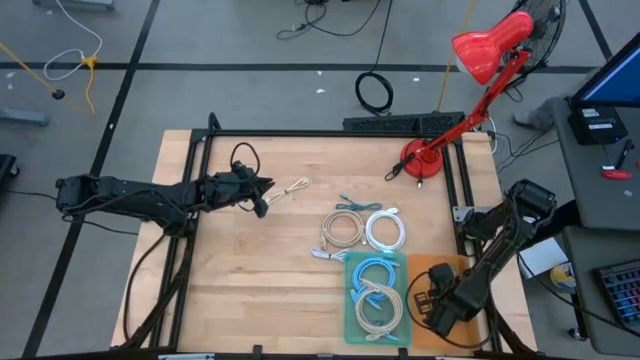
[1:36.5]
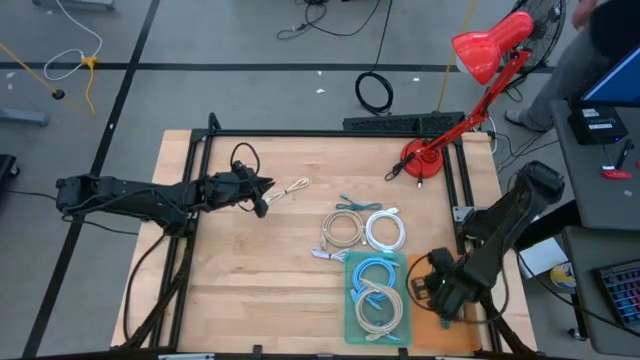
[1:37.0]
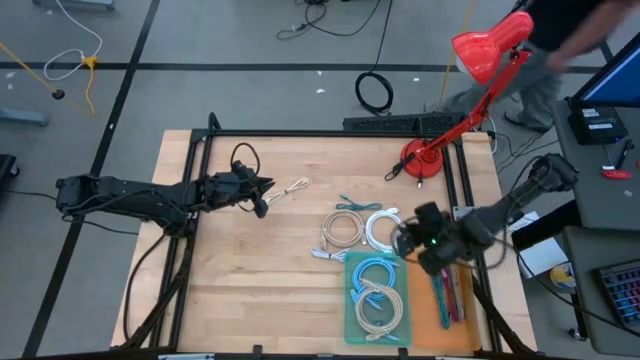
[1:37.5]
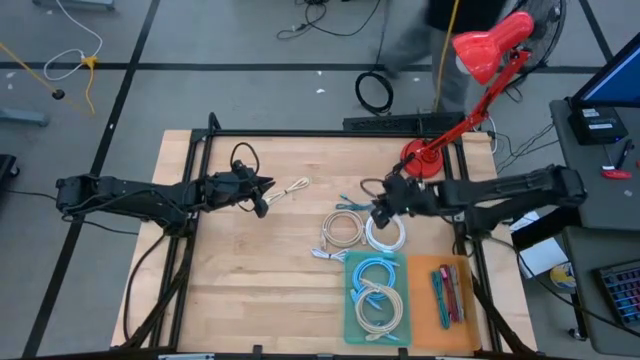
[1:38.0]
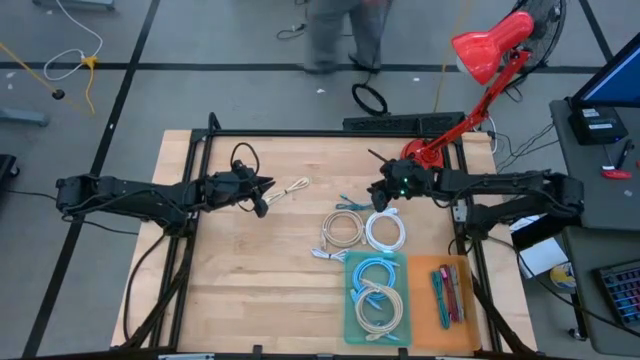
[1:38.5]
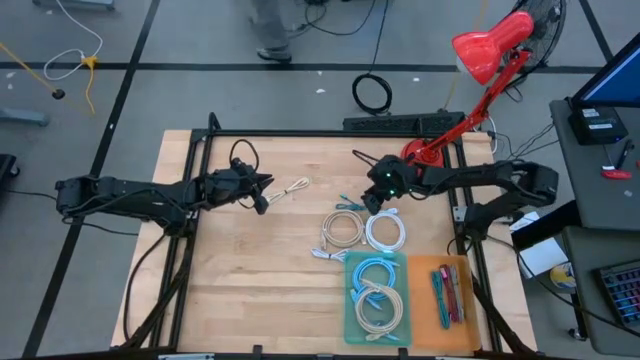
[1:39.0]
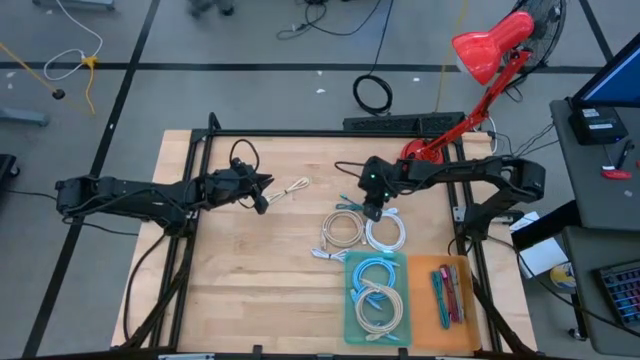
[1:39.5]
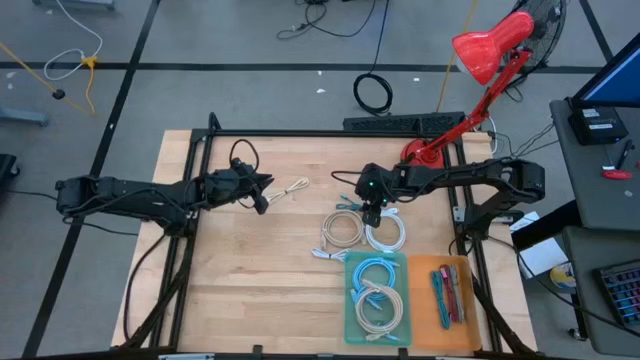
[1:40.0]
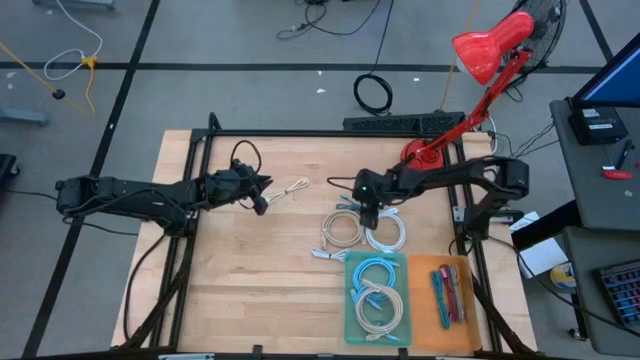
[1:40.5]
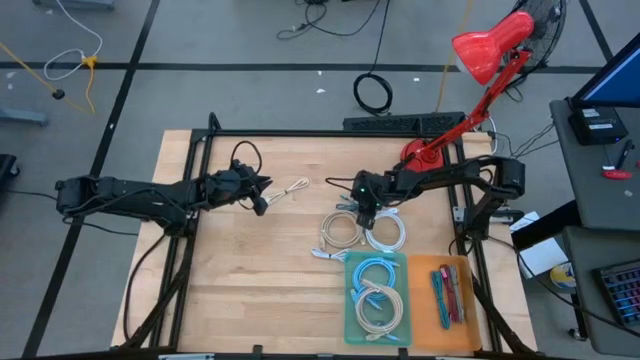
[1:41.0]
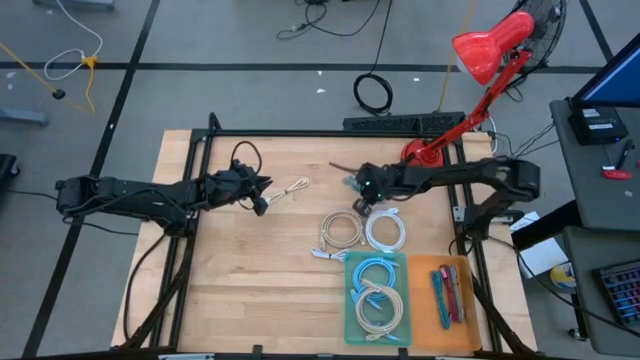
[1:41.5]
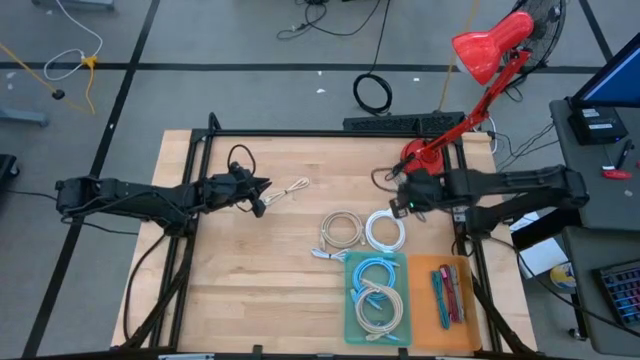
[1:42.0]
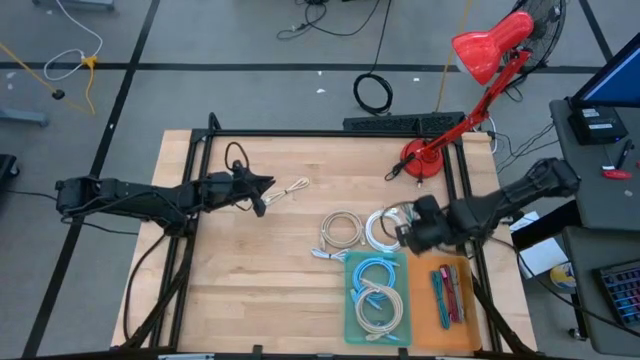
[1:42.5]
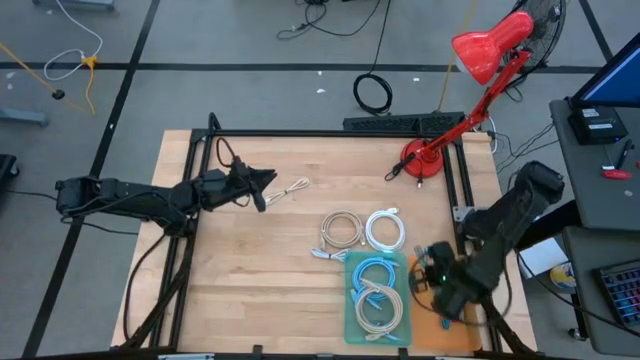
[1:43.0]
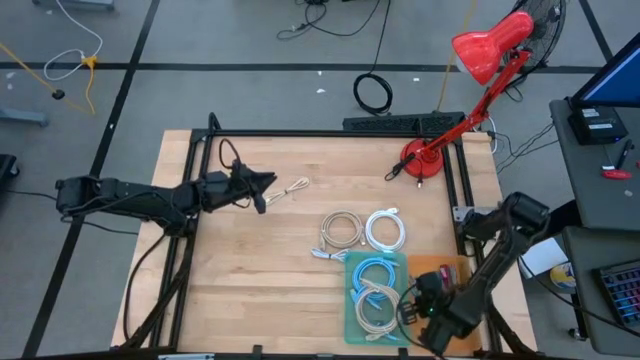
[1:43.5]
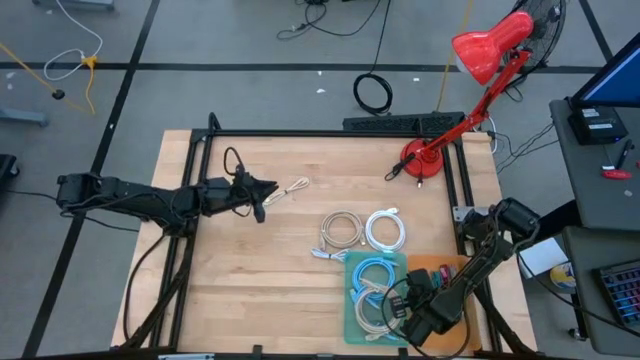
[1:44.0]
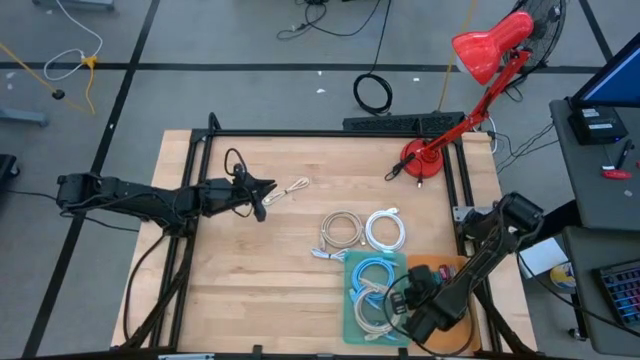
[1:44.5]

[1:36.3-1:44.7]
Task: Pick & Place USB Port
Put the blue charger cable into the orange bin

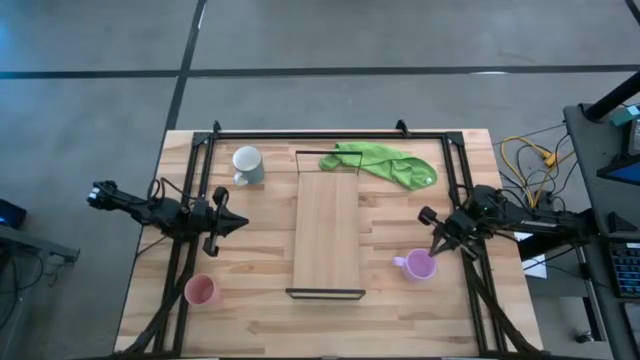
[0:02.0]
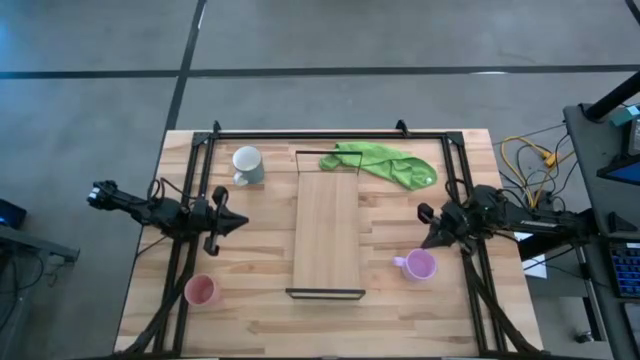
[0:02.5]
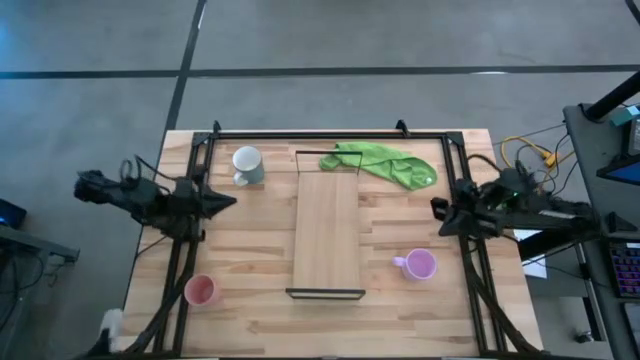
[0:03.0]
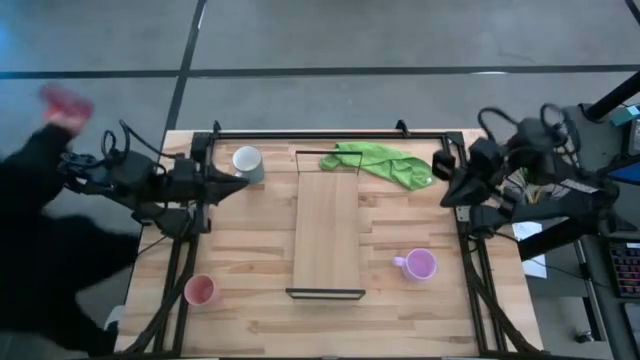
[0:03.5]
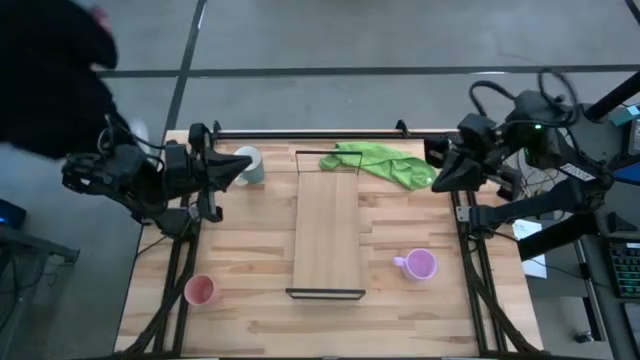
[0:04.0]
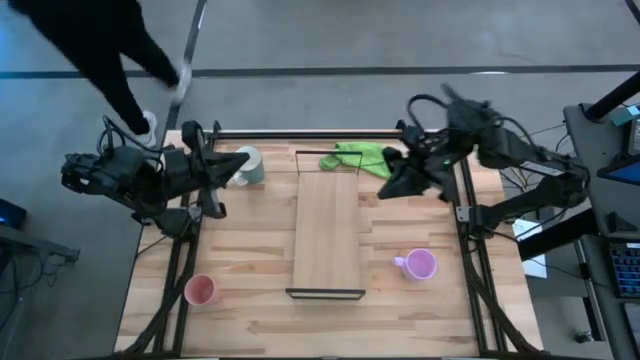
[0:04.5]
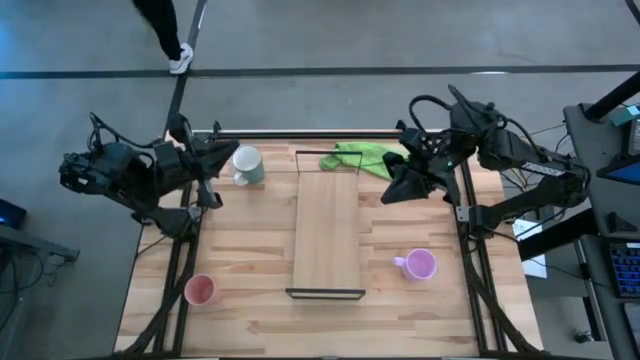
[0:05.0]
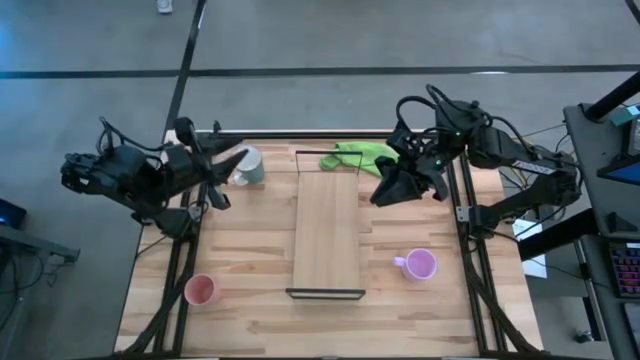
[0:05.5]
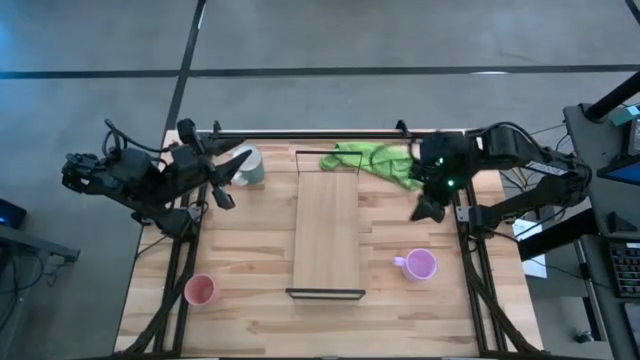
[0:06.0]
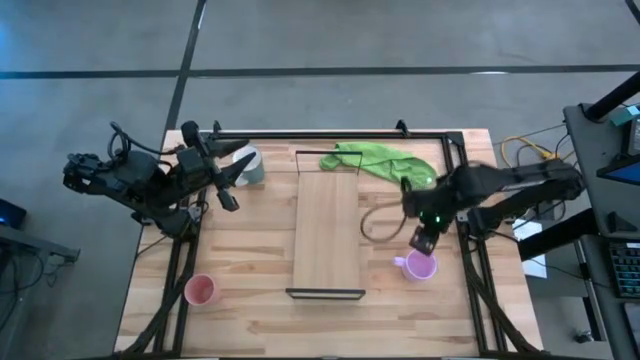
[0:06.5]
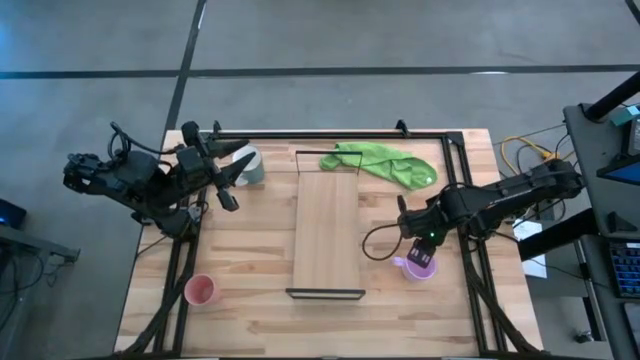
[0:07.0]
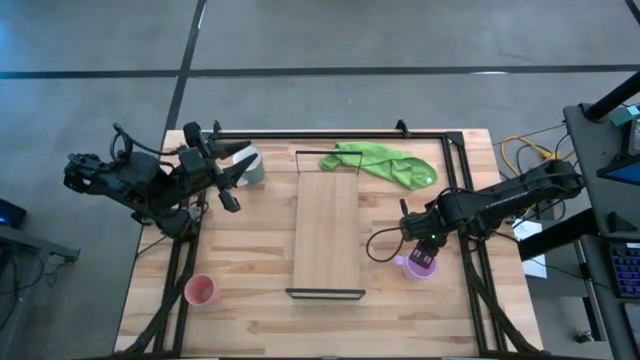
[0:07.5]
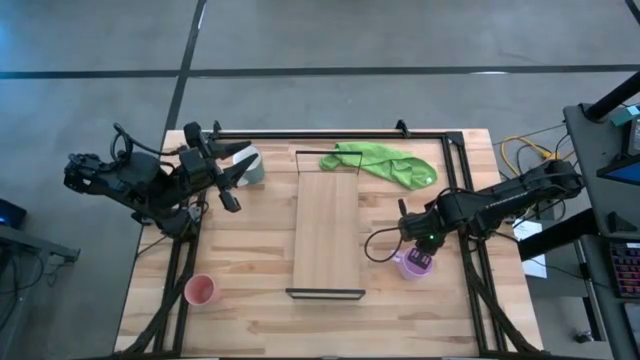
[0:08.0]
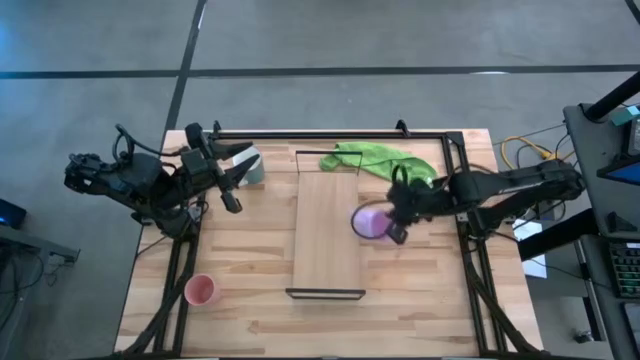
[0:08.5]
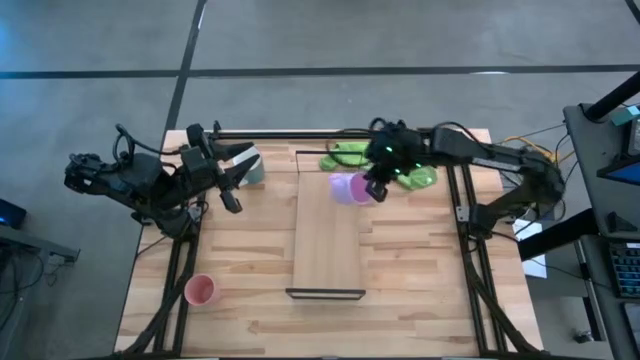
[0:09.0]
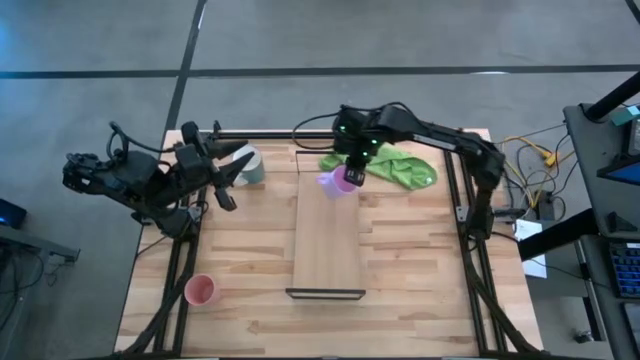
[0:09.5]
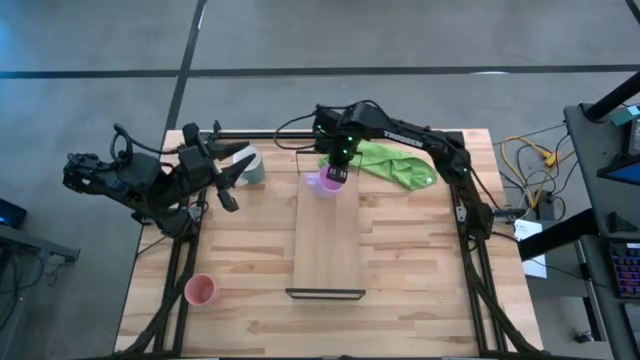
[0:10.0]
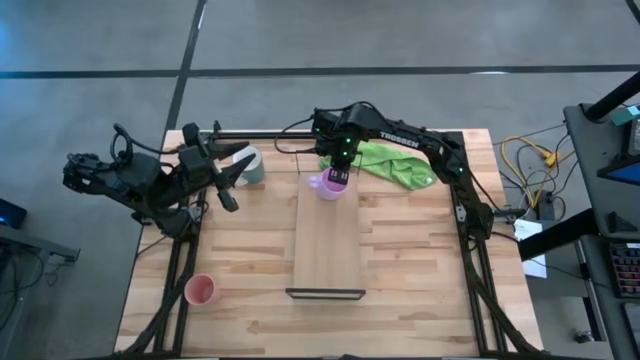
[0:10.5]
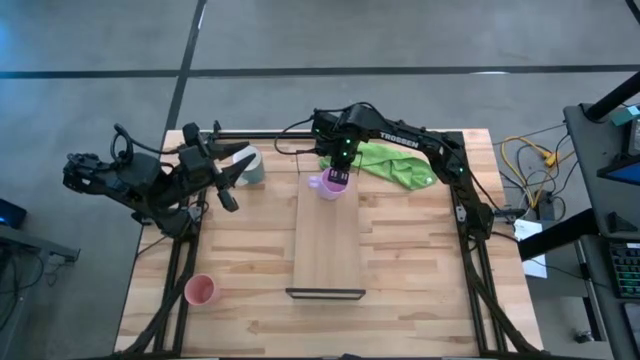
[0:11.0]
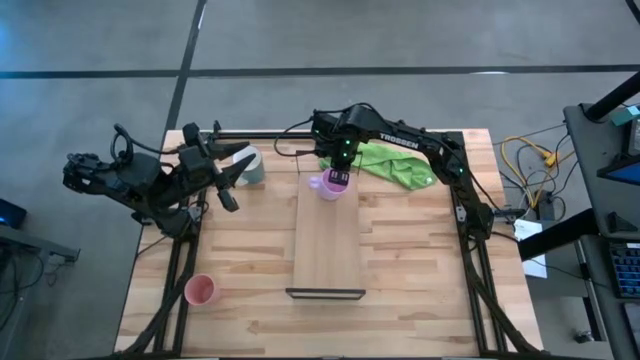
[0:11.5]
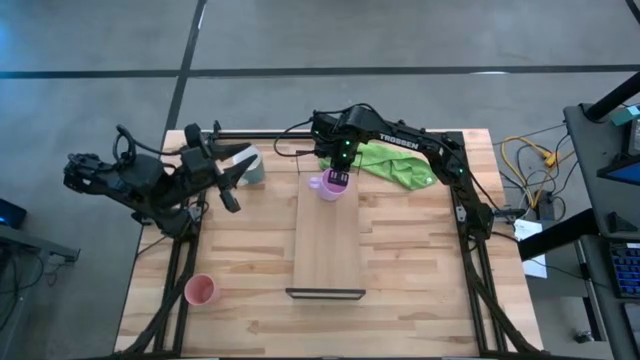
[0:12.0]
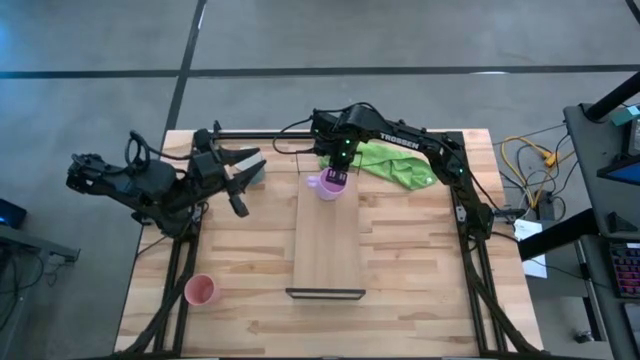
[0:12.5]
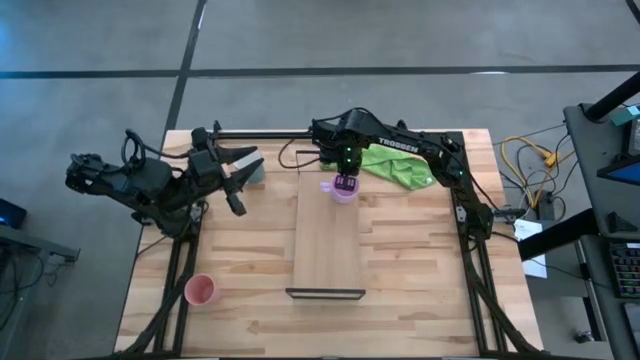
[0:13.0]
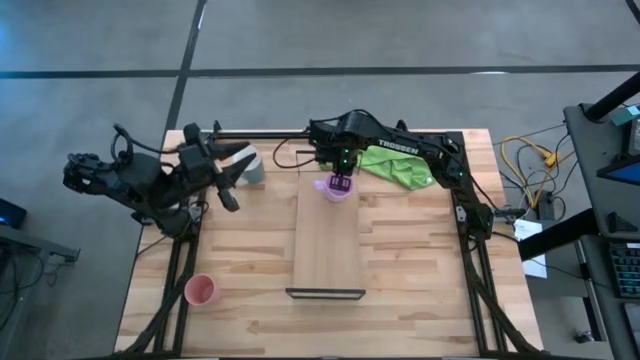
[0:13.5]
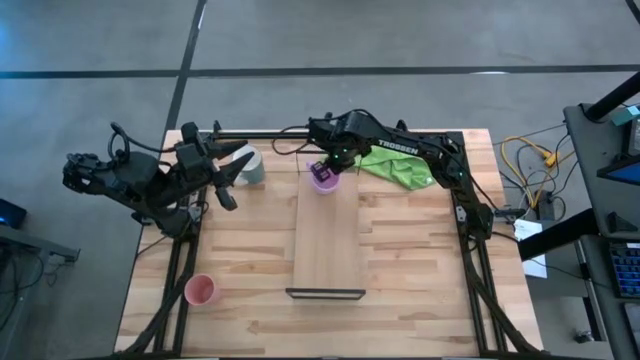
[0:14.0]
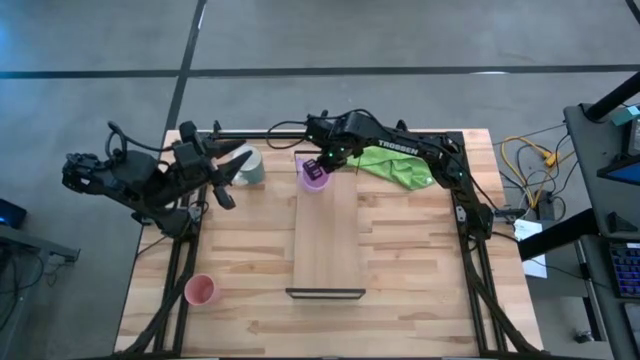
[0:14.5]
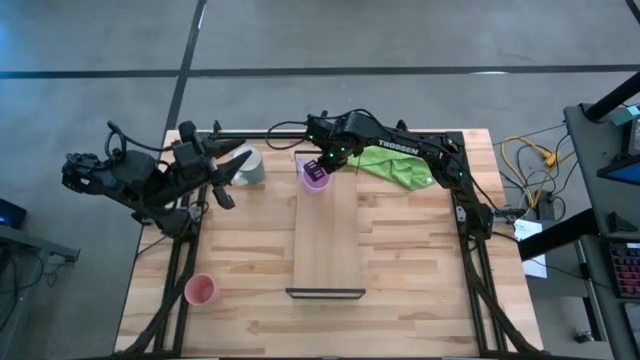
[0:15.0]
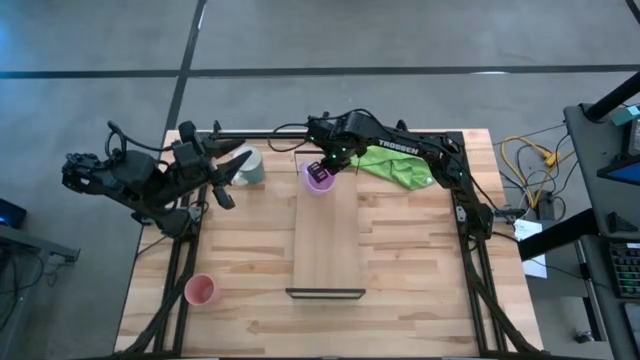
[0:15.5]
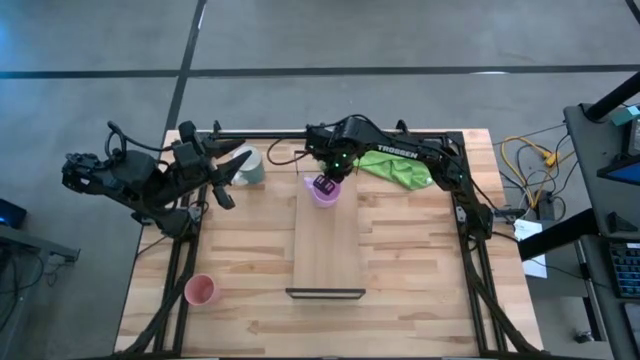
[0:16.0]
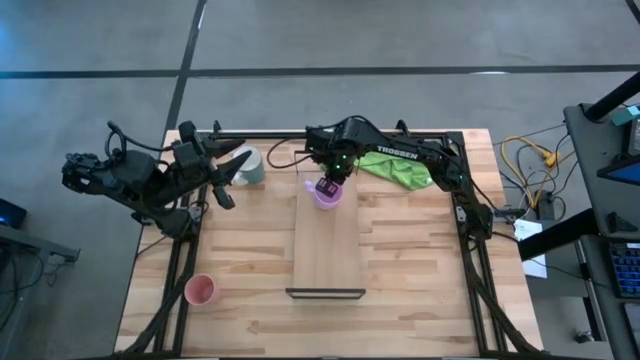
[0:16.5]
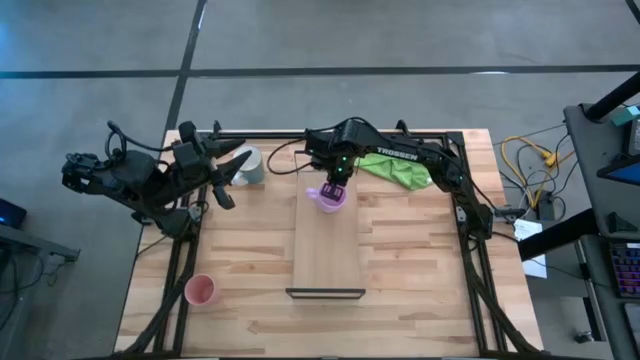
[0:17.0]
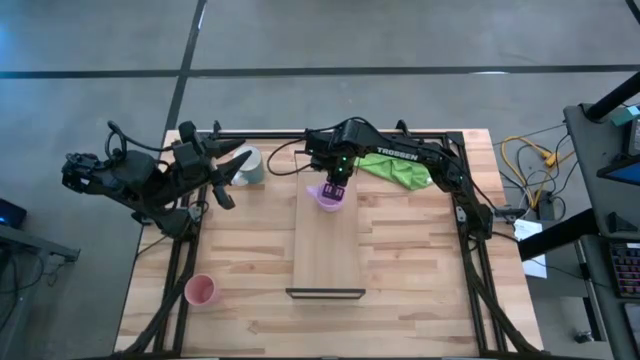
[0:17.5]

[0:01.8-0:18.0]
Task: Stack small to large cups/mugs on shelf
Put the purple mug on the shelf
